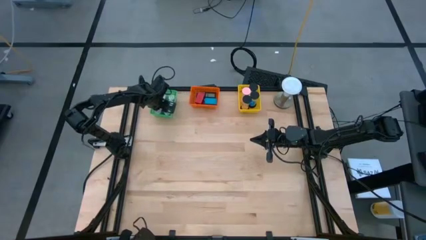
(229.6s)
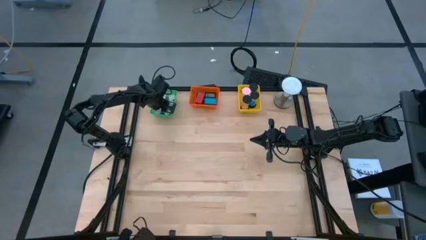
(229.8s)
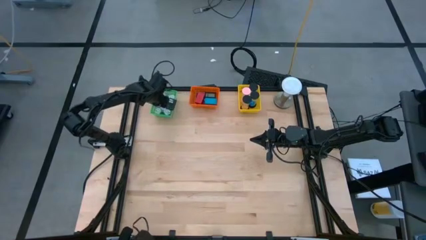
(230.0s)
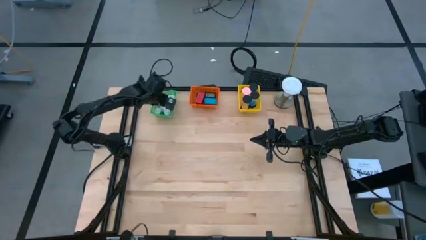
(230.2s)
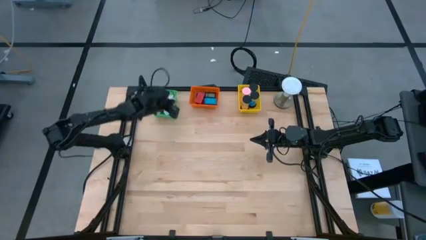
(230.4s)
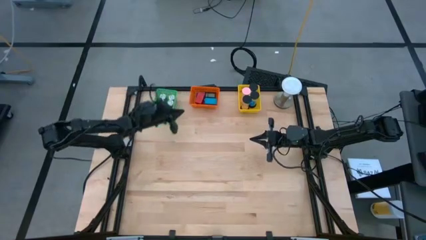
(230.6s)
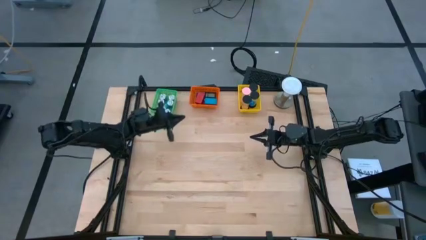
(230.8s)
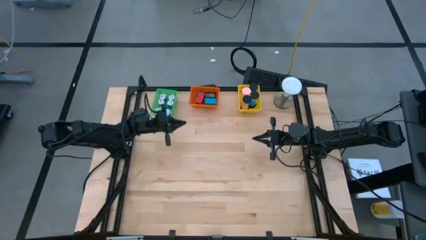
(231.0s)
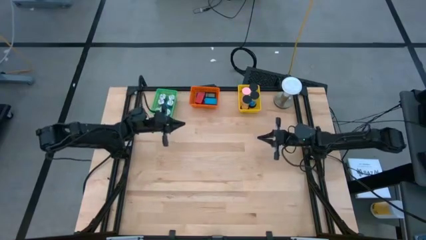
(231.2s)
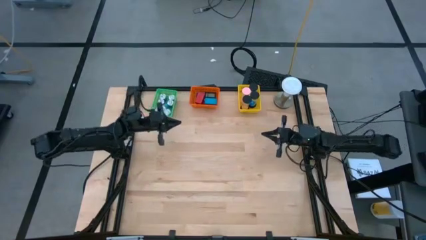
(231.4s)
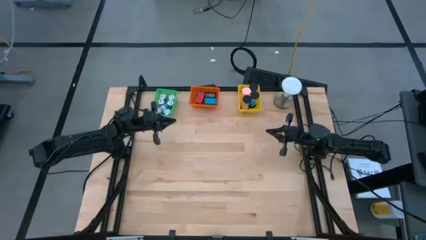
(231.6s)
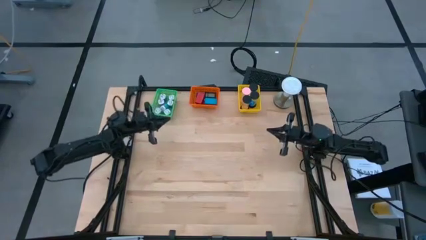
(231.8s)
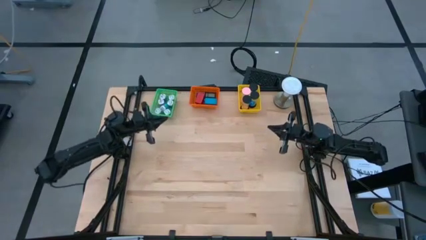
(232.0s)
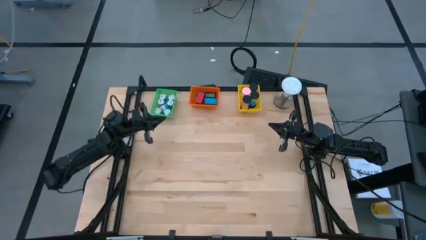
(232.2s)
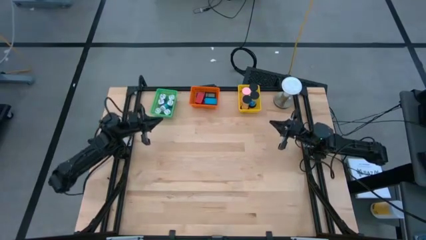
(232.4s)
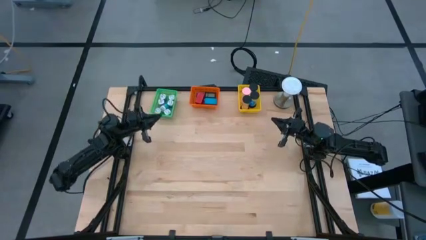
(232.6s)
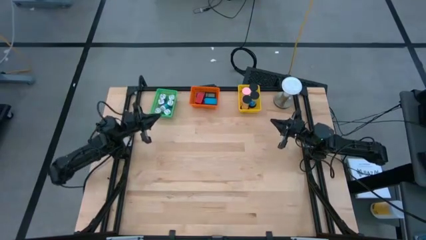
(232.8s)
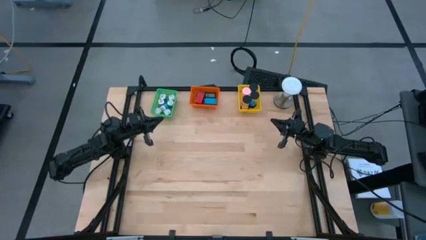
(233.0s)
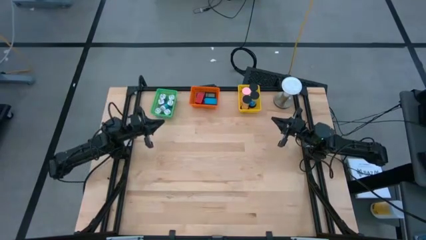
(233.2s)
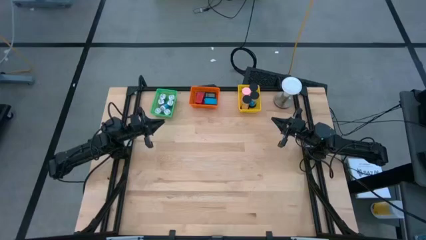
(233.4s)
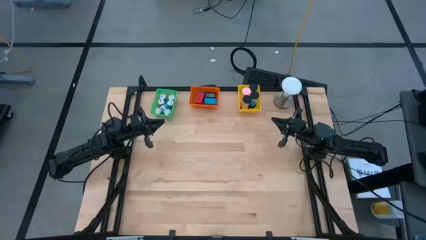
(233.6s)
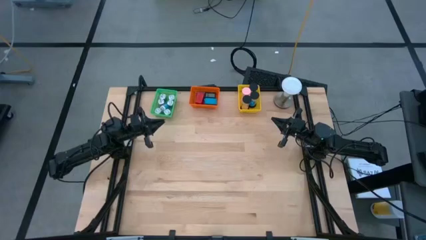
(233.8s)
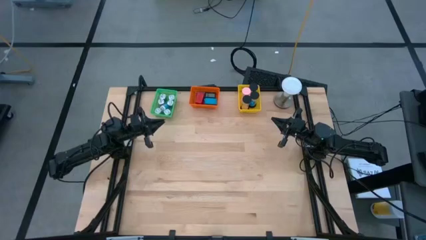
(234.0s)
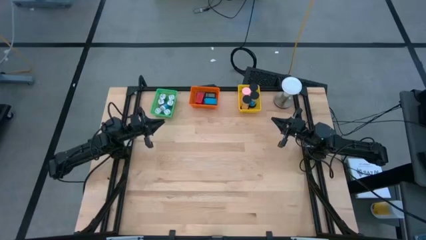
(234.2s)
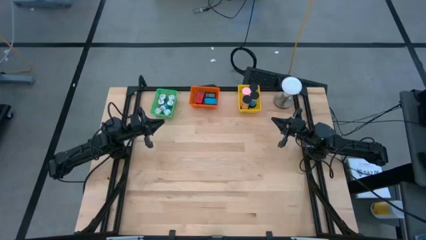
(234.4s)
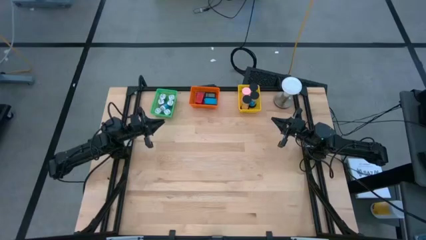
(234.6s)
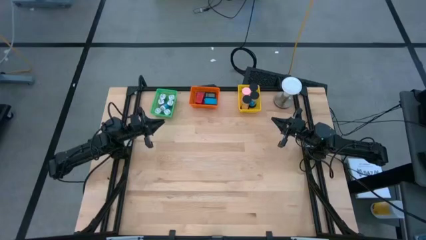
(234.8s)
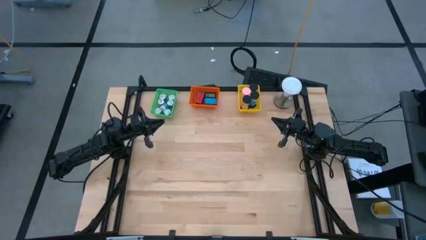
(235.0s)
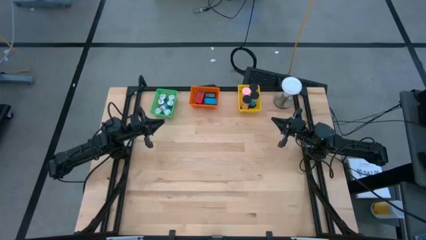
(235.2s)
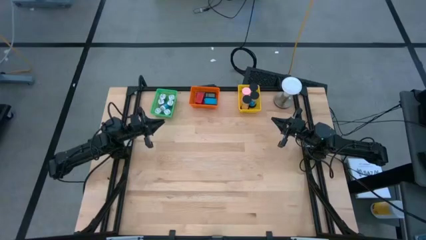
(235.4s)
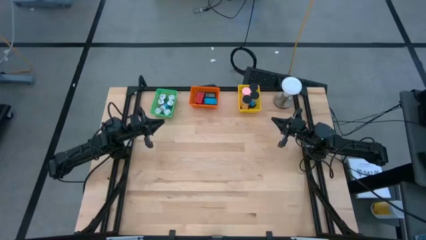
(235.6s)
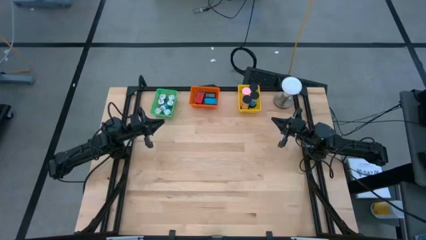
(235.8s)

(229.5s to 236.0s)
Task: Pick & Place Office items
Return to Home Position

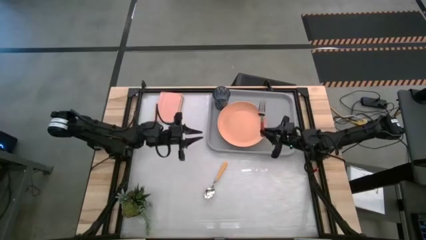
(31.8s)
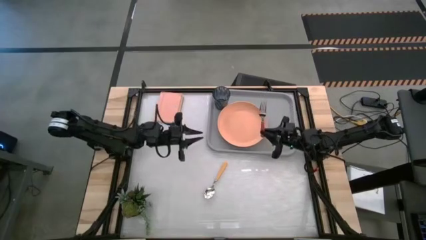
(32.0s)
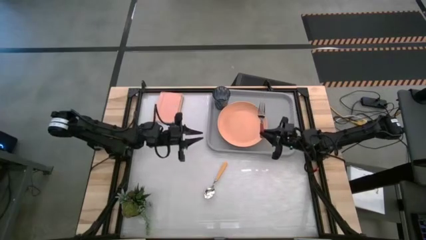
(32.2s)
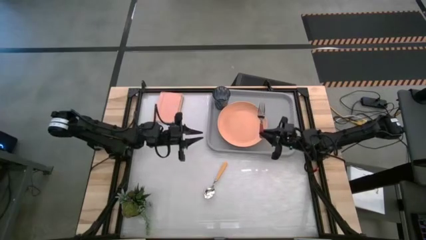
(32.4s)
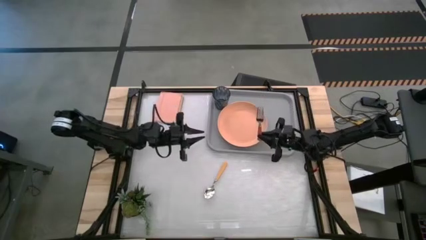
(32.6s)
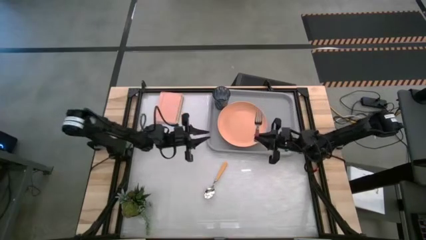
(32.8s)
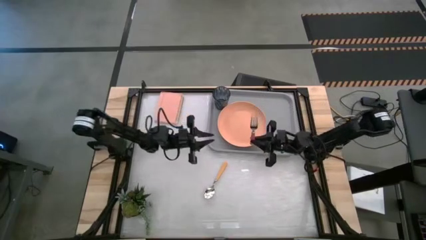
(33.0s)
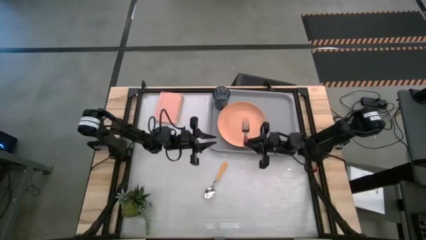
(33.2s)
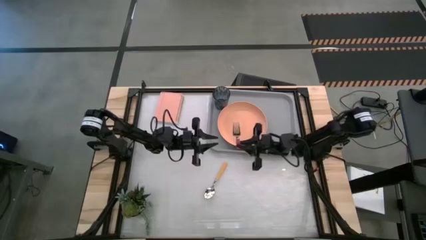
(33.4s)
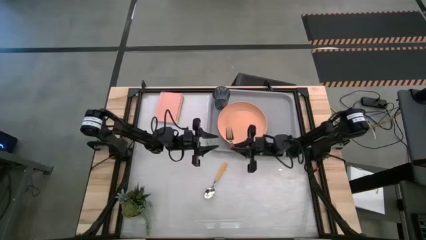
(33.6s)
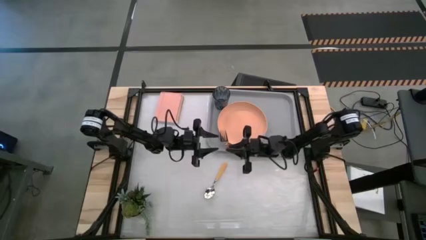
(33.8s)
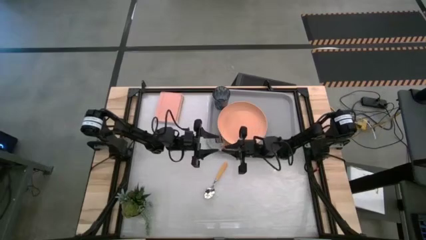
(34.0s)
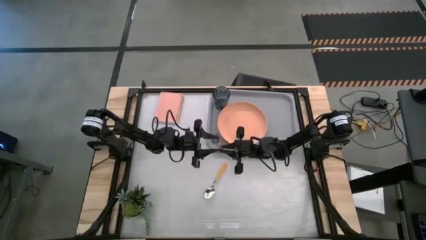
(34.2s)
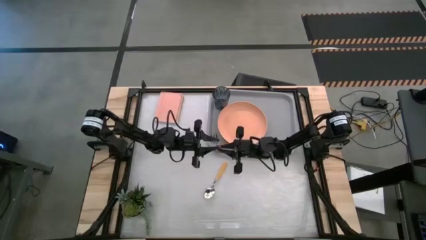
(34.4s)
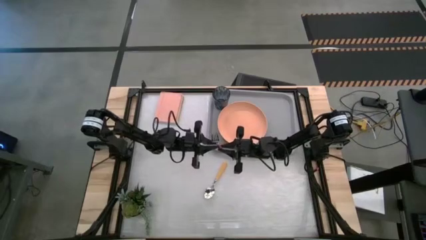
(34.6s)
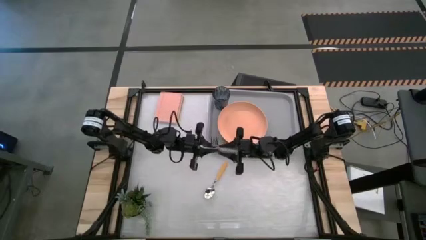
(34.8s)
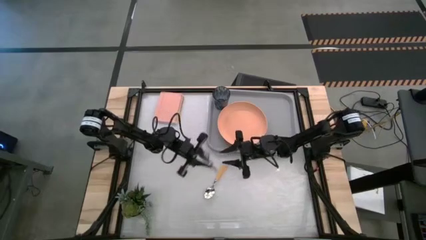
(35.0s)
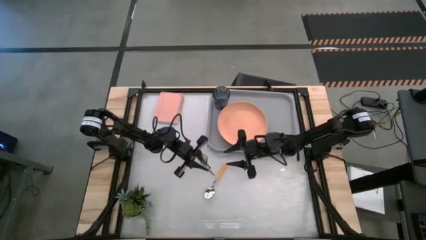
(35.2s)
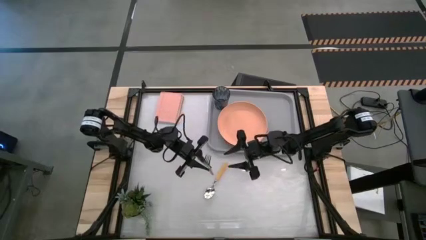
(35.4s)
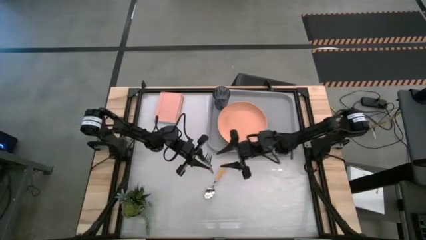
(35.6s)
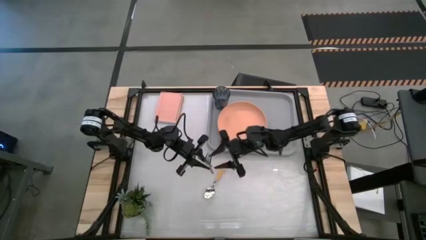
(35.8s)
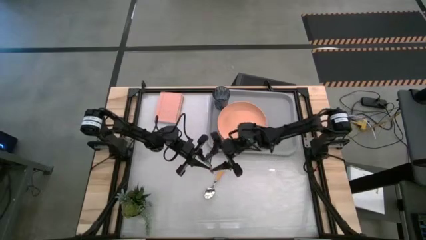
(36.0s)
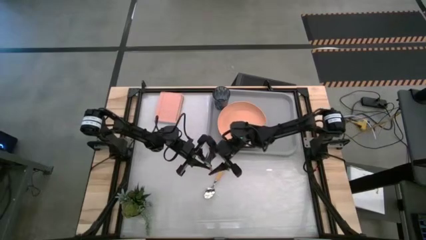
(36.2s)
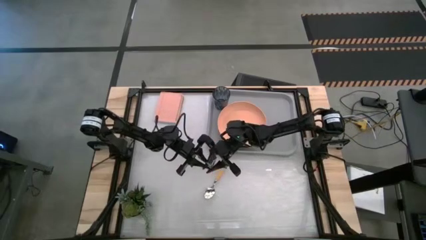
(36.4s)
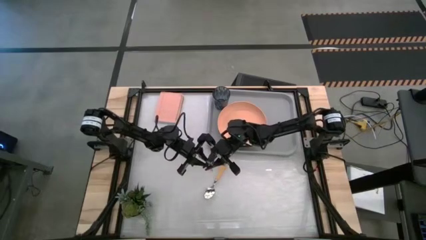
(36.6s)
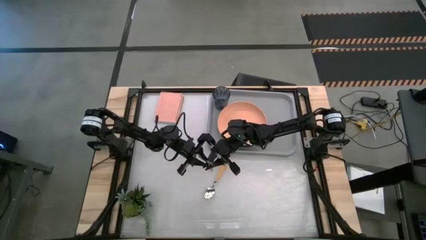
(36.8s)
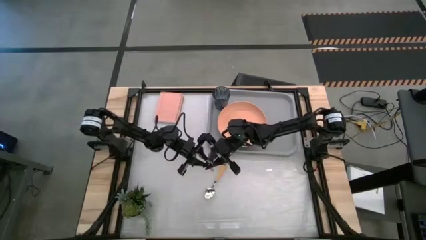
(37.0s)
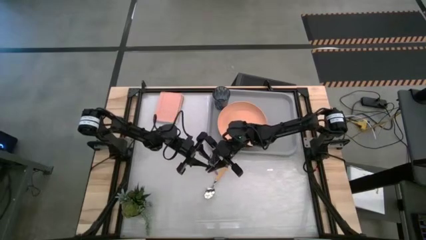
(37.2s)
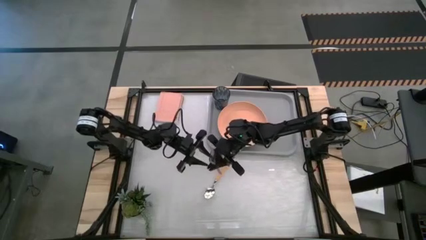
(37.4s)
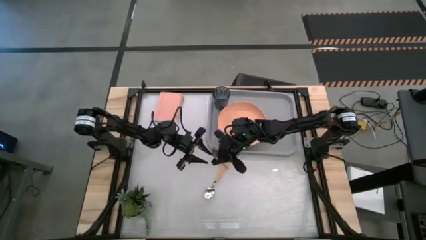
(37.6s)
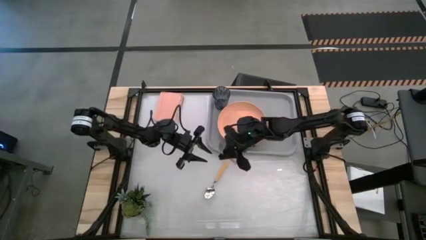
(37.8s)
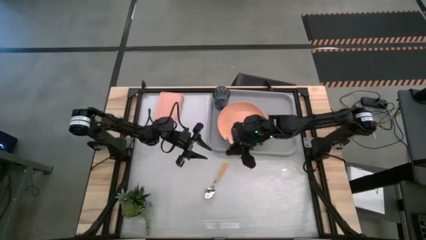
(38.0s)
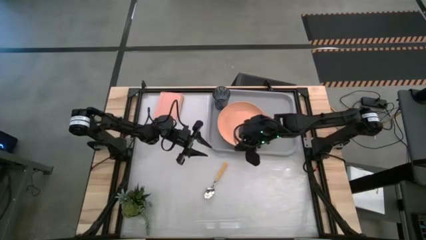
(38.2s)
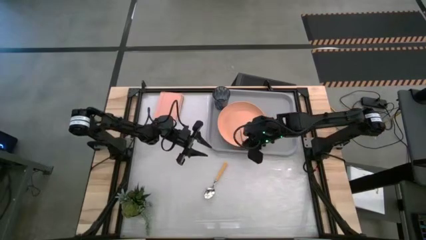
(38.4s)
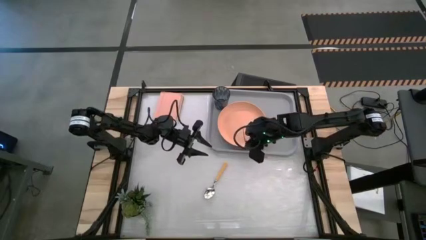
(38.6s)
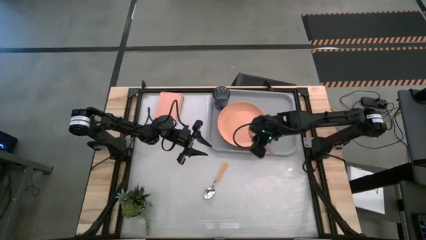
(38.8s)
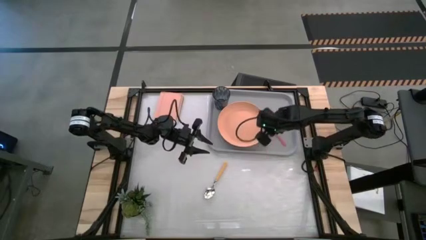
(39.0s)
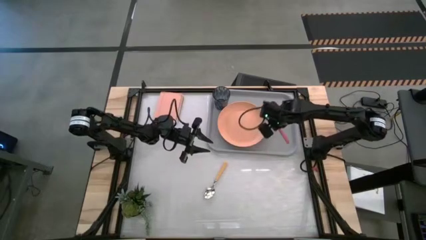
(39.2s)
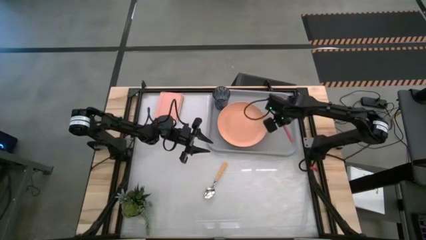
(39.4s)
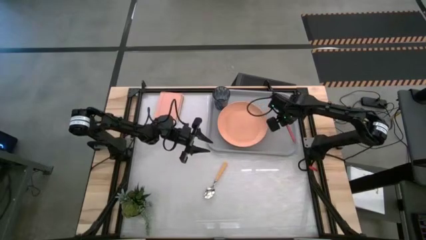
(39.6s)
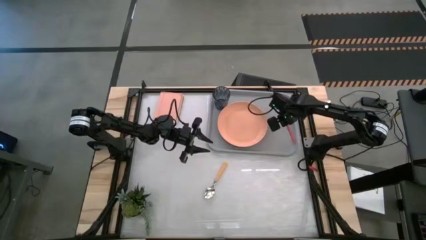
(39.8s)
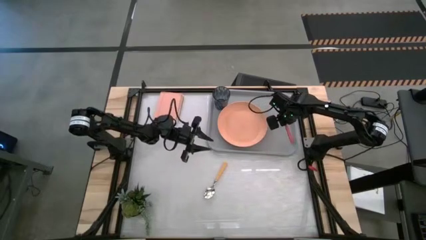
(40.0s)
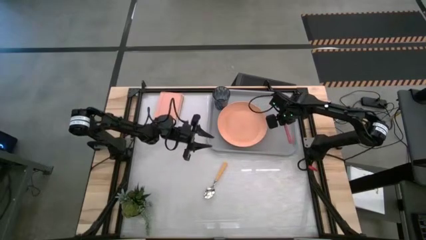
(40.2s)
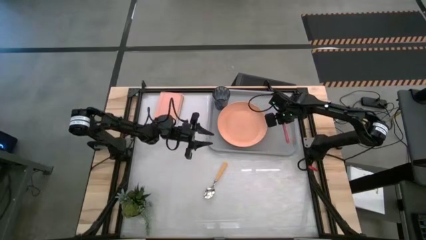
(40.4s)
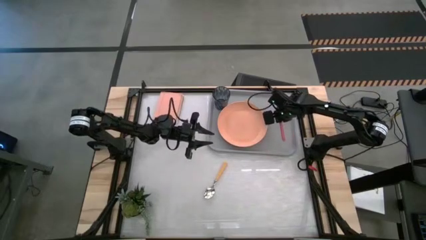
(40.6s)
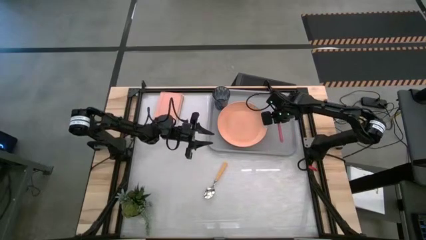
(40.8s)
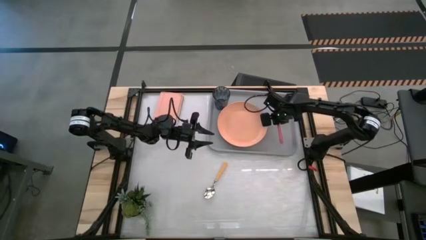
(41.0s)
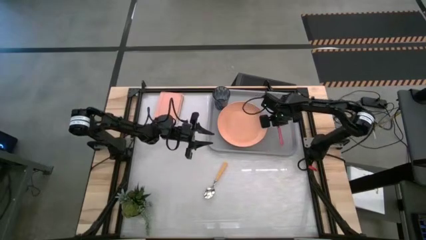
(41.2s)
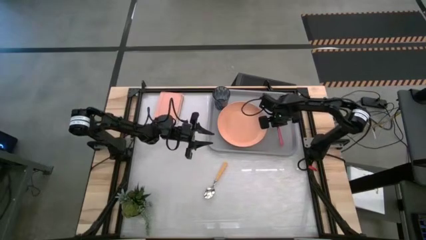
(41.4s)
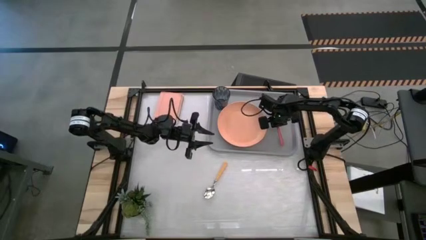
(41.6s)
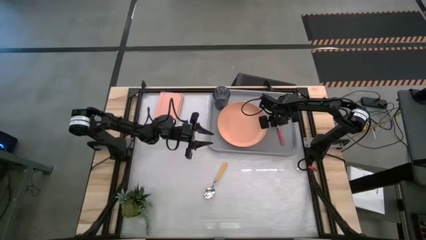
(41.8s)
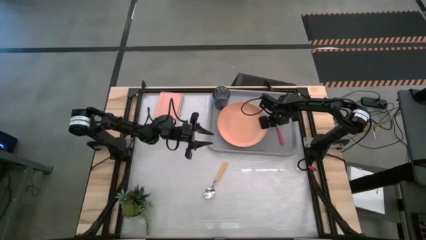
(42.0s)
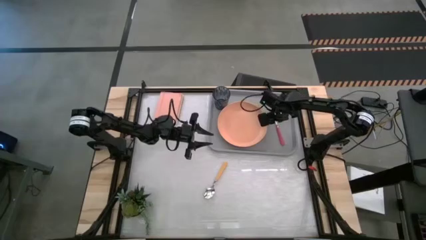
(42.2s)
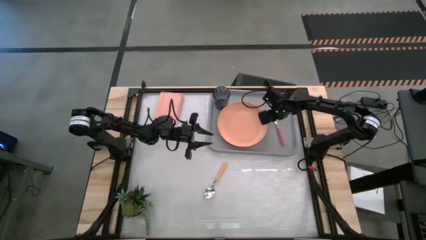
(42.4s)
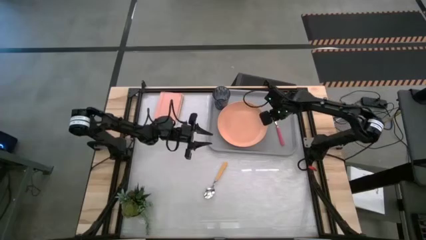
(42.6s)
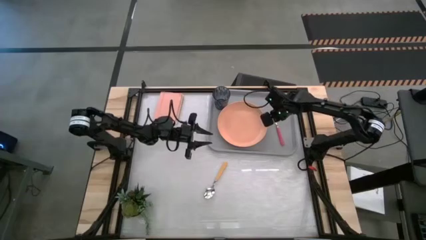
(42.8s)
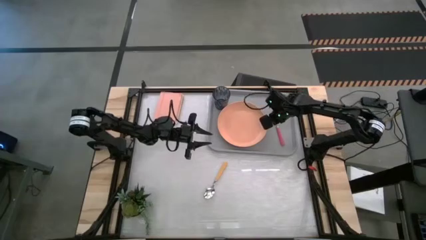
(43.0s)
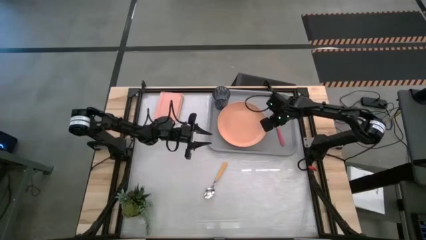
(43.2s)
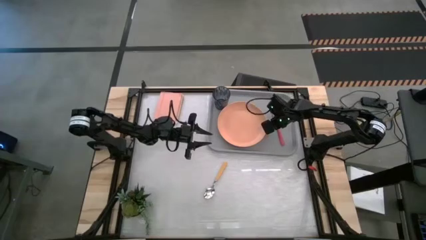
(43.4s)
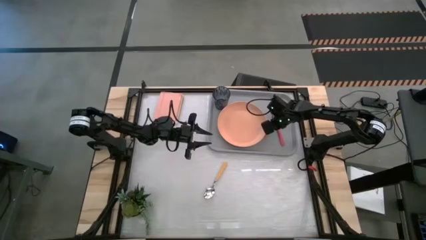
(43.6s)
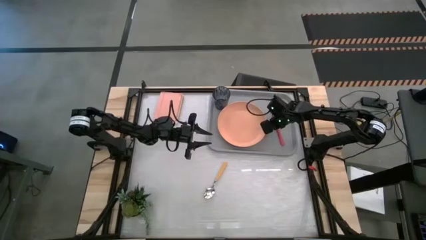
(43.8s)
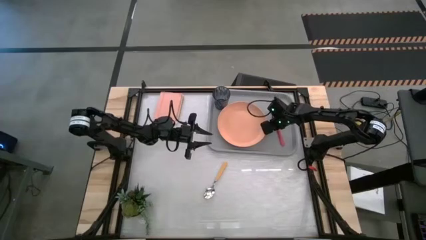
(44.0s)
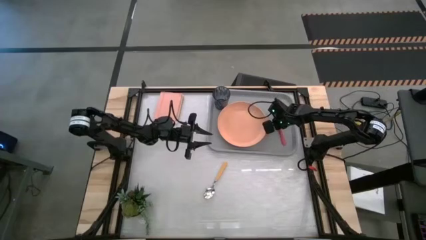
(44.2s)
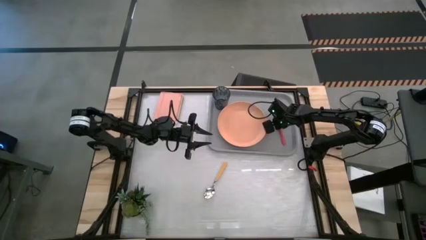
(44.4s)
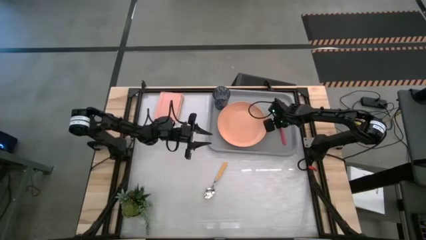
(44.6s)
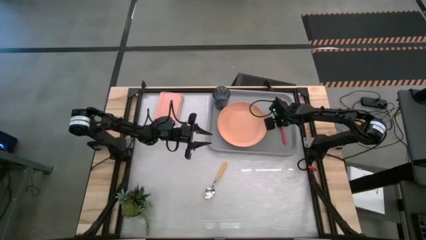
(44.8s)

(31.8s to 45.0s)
Task: Pick and place plate/cup/fork/spoon on tray
Put the red fork on the right of the gray serving tray
